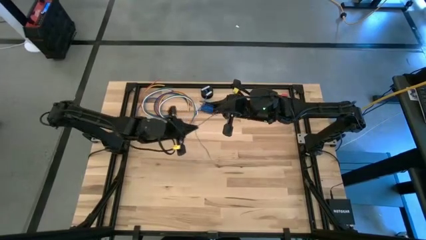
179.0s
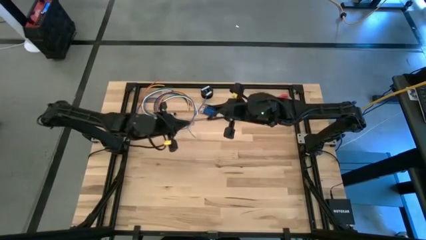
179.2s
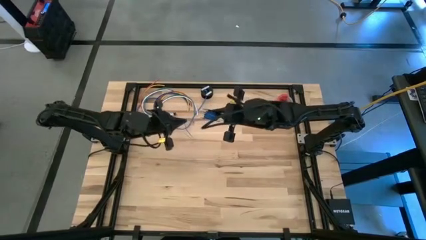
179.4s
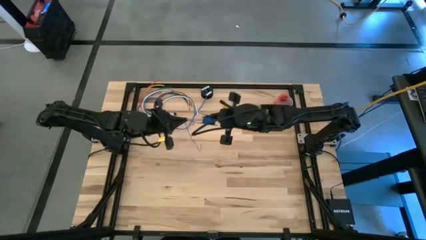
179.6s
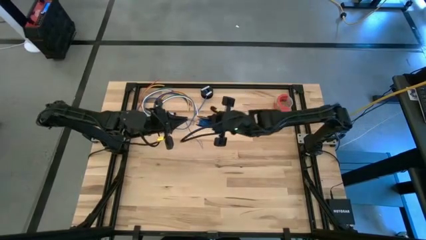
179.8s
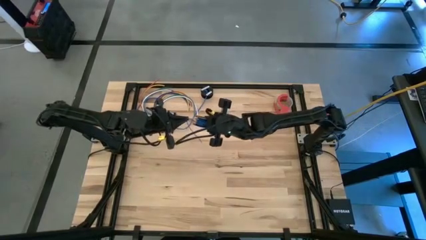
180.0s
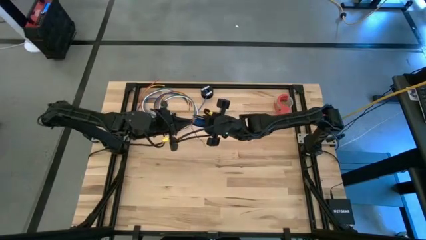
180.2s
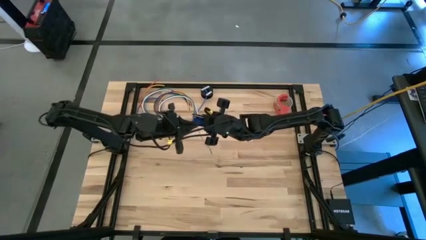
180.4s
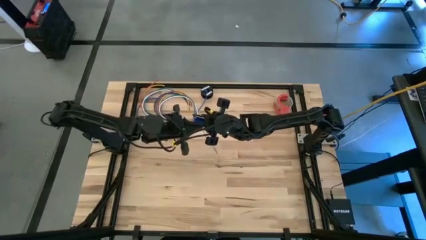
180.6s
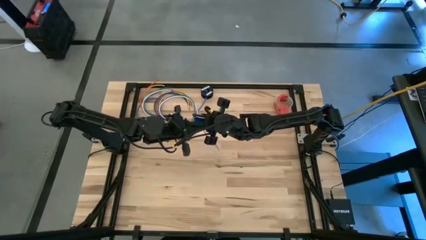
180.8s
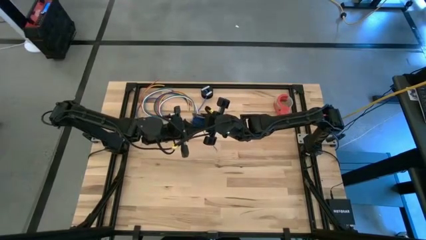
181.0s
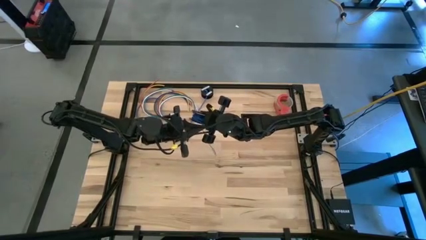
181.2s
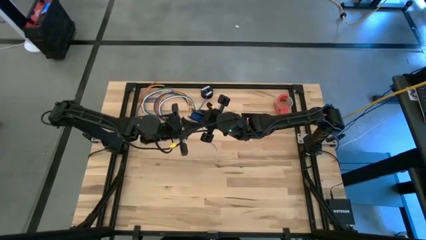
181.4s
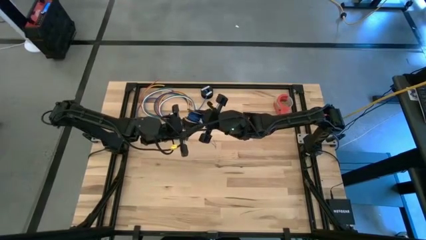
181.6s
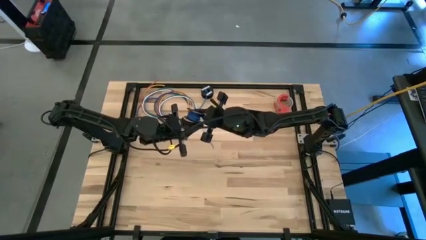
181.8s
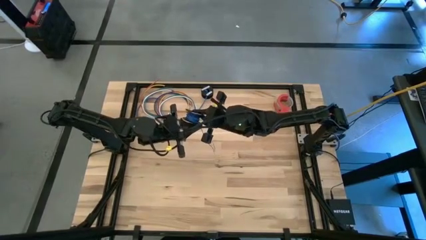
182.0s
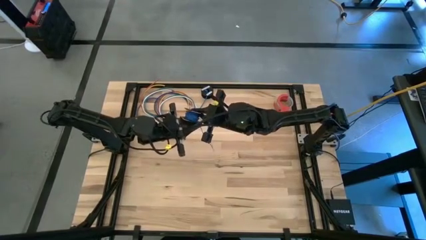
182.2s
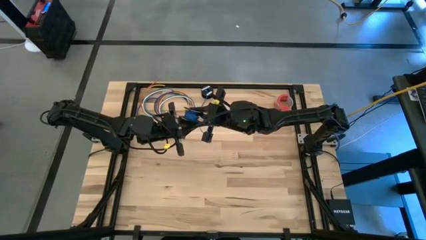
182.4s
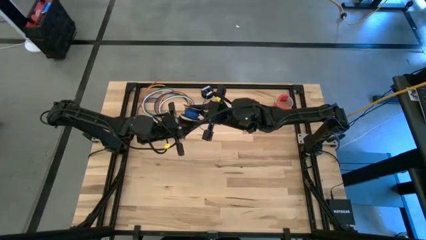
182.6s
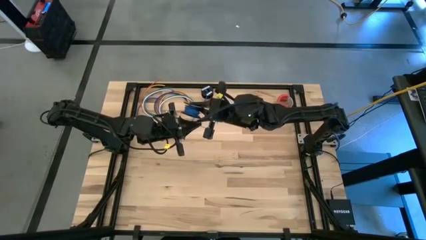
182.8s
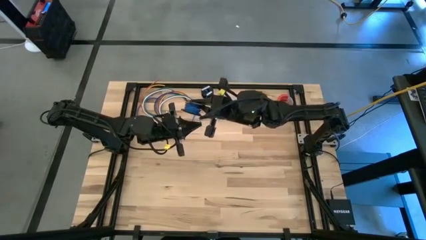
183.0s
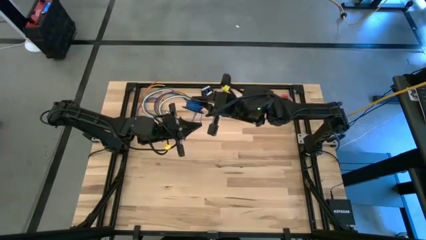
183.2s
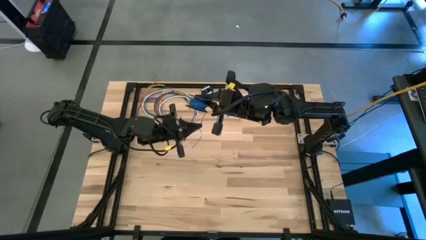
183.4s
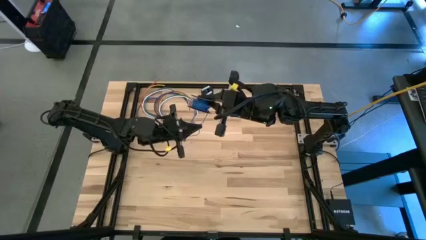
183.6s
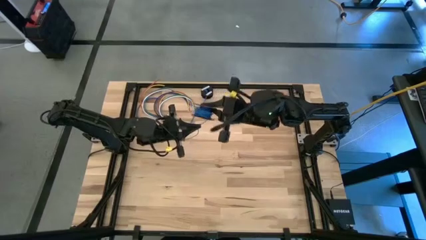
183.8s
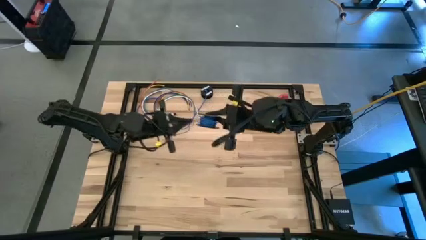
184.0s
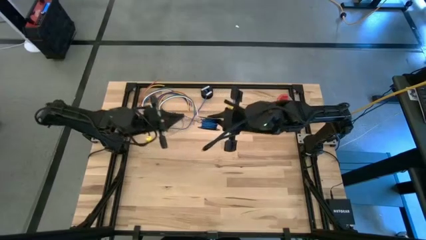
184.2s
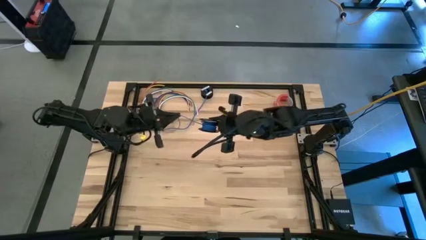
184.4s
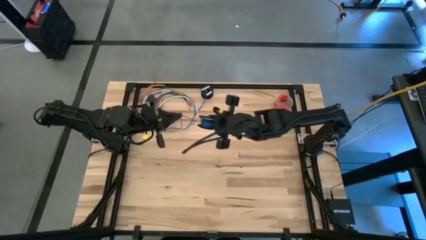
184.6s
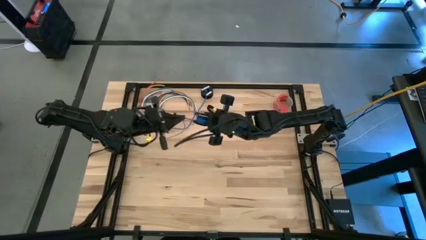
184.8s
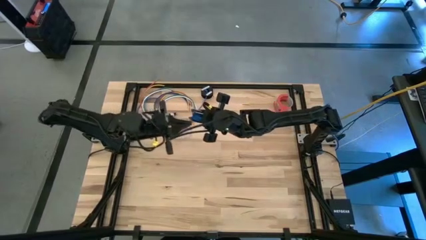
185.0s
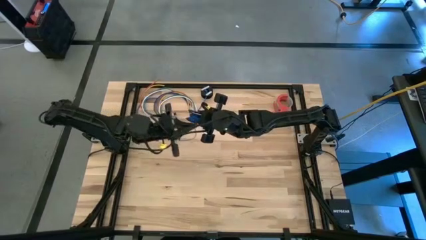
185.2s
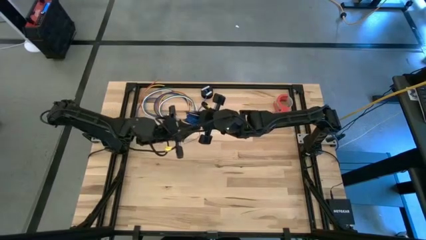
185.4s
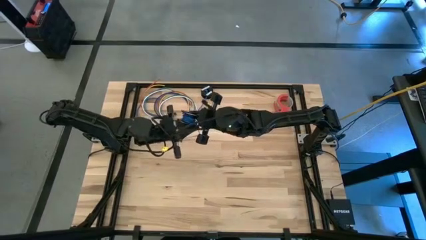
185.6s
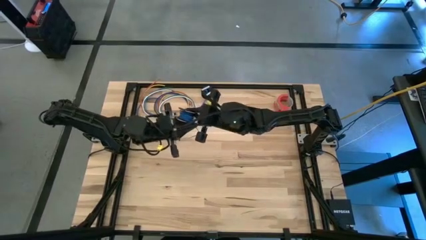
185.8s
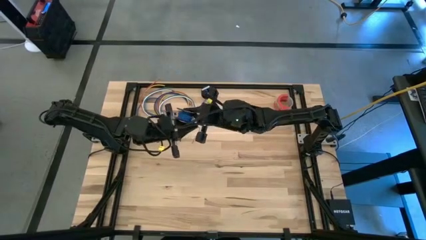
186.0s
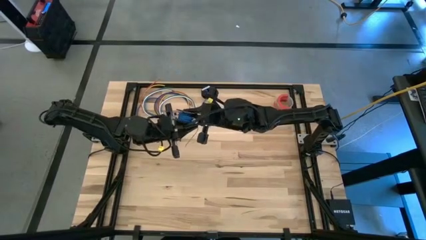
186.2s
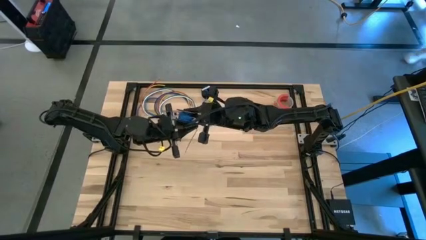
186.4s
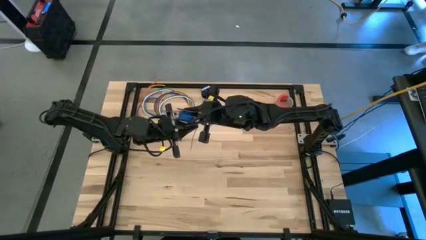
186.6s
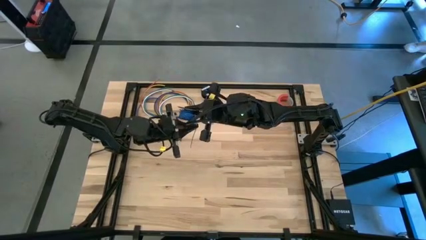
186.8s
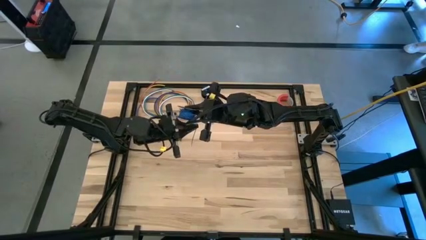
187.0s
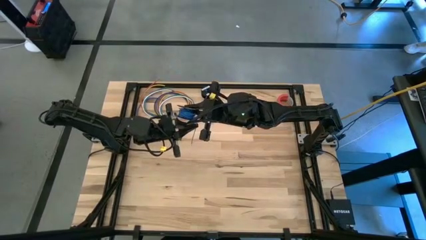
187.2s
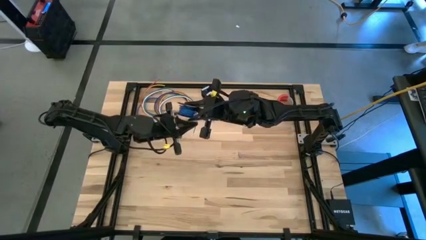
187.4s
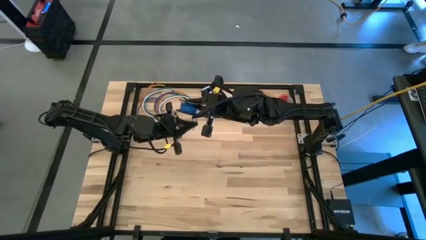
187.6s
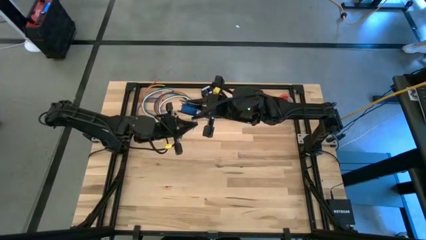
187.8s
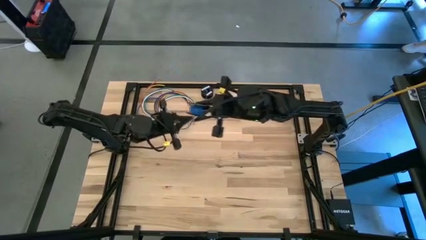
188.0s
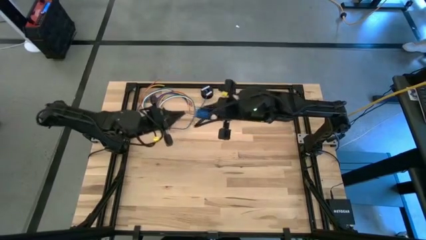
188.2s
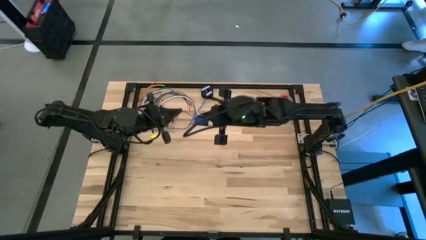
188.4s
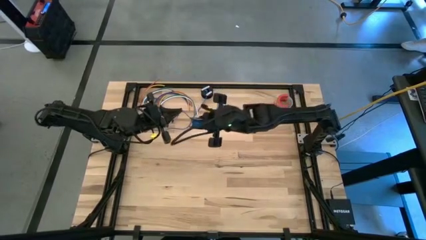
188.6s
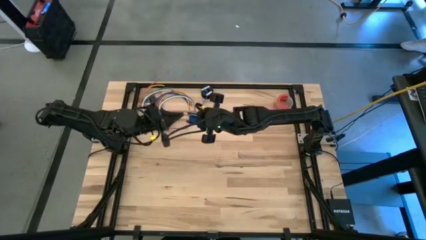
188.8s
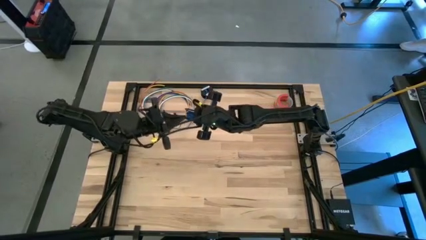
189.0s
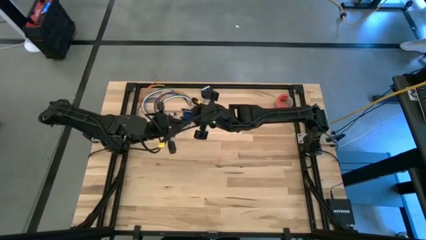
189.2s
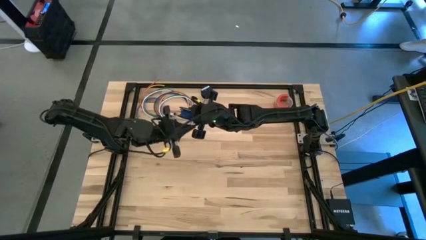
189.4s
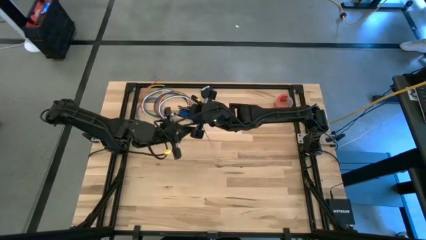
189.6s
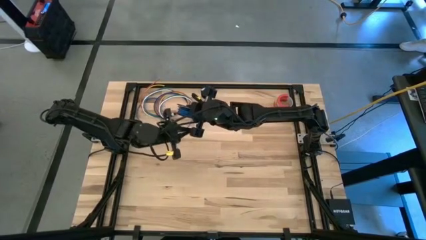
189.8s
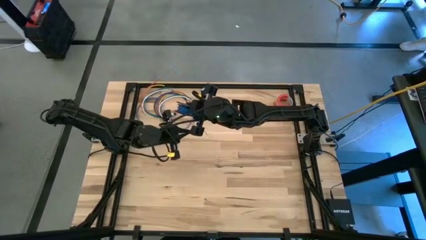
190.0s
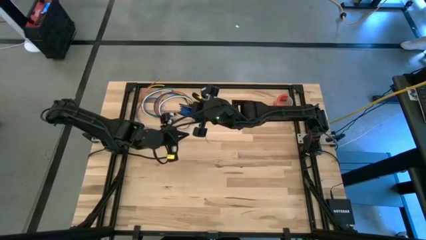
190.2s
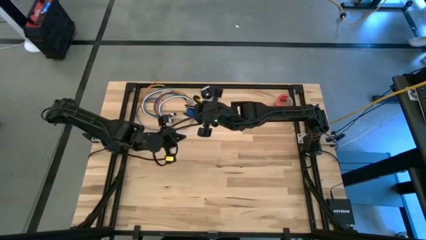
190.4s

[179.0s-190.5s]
Task: Coil cords
Coil the blue wire onto the spool

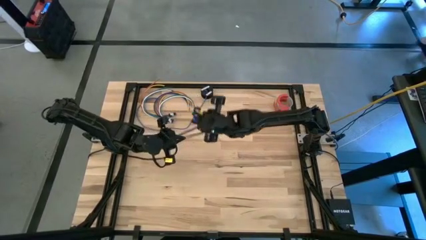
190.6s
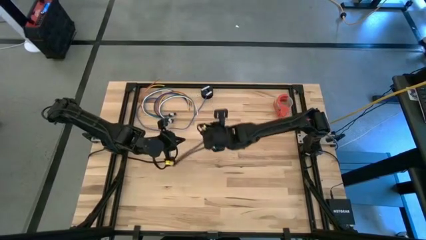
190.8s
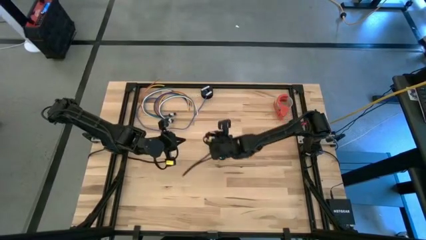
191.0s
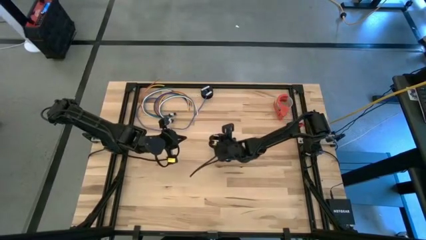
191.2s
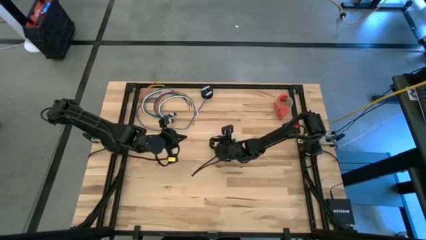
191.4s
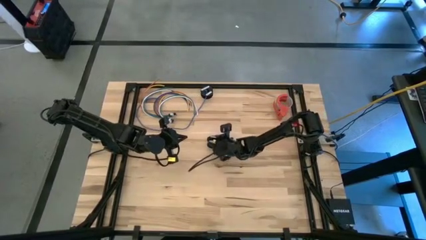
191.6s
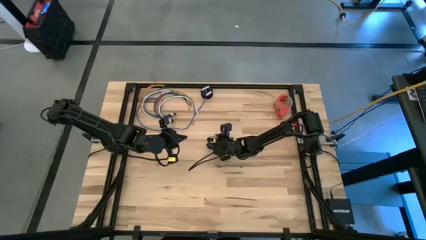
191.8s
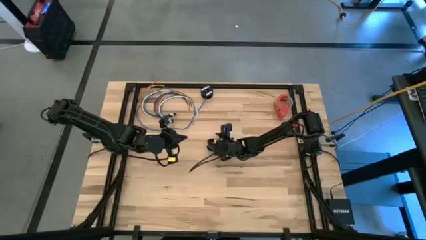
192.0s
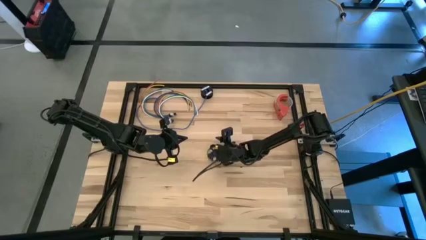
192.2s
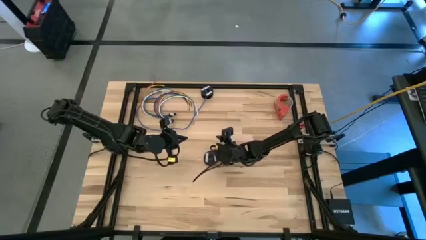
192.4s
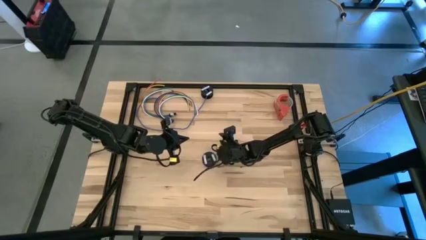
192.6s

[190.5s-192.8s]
Uncoil the blue wire from the spool

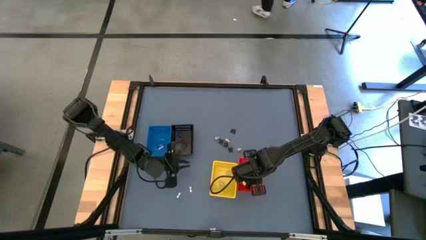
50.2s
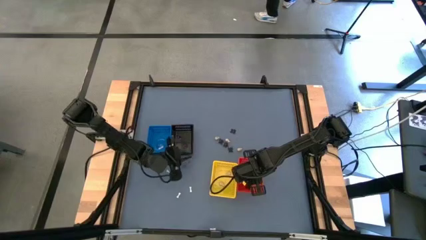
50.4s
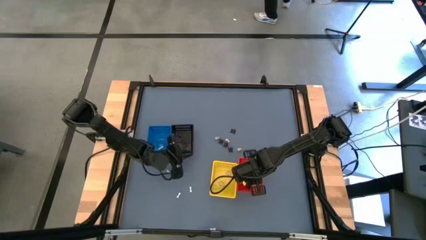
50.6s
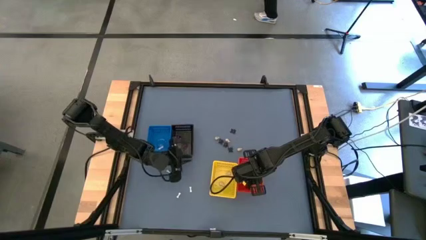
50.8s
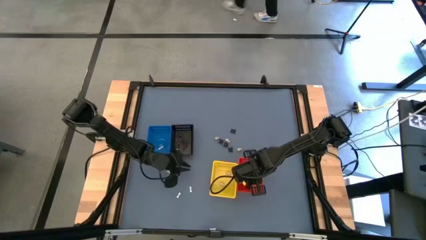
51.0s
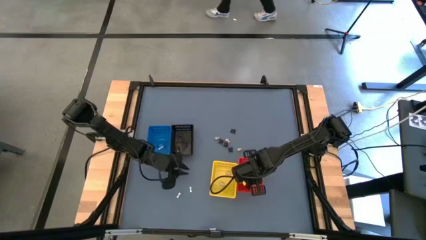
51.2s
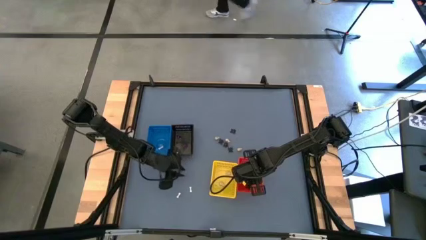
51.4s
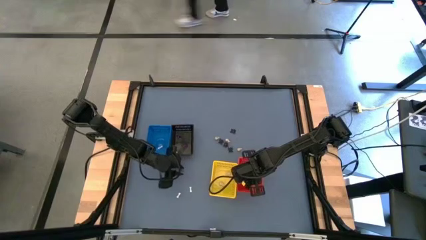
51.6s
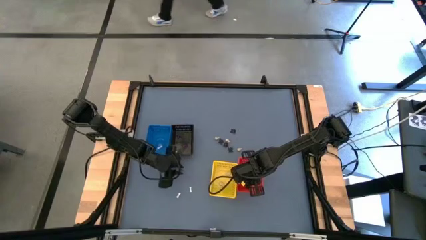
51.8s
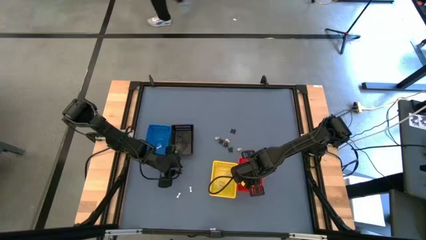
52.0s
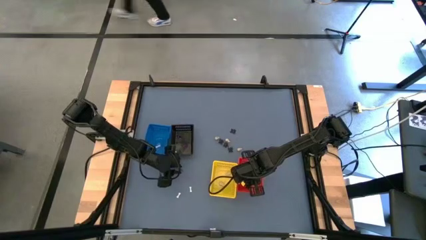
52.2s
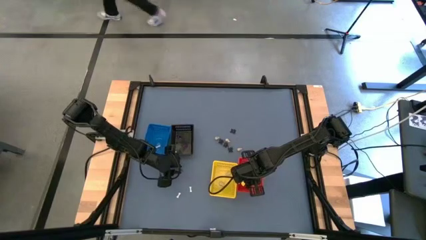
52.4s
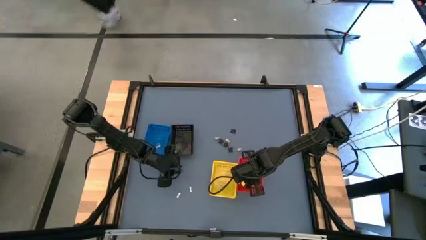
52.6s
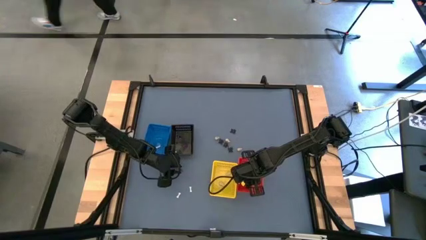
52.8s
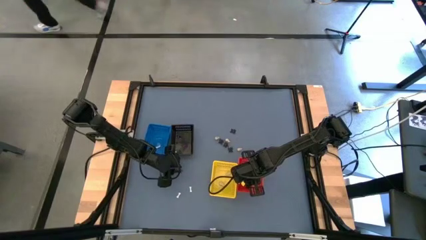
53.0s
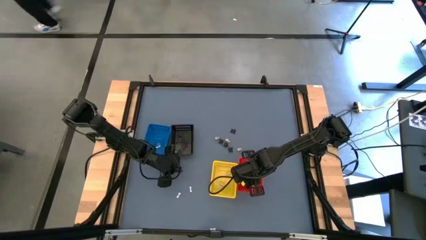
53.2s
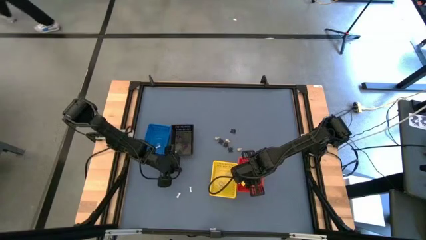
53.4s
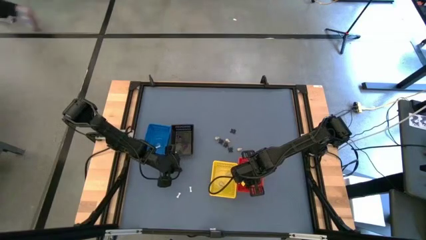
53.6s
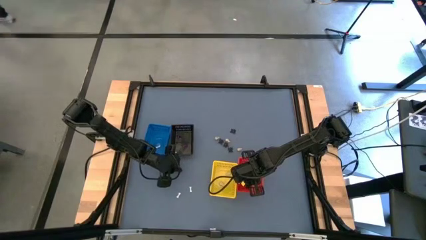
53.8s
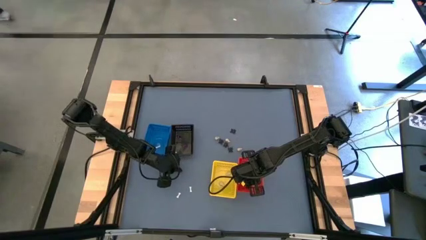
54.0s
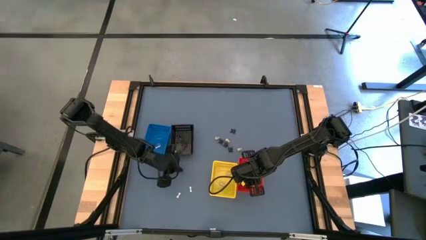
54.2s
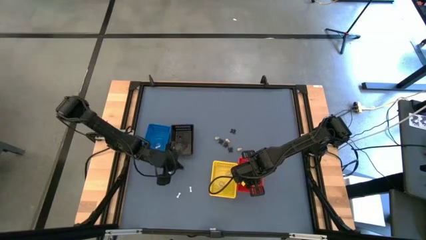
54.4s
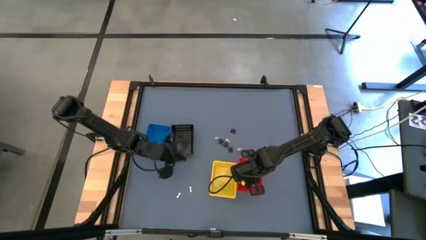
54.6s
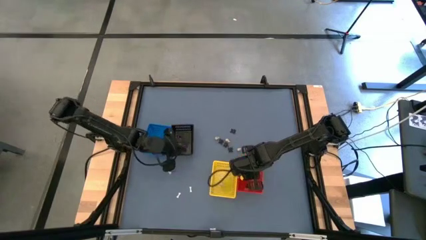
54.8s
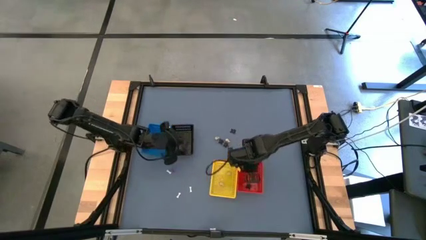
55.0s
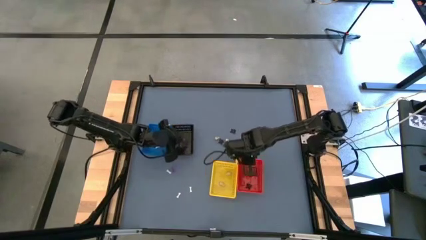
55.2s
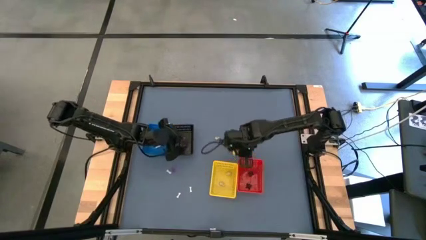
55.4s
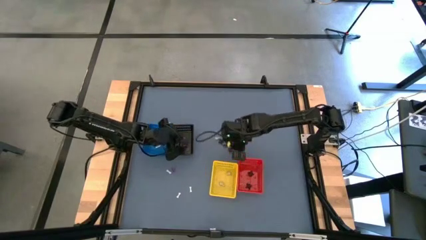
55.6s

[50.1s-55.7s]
Task: Sort Halloween decoration
Put the witch hat toy into the black bin
